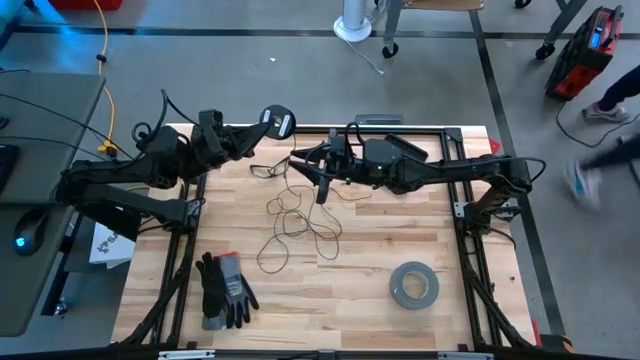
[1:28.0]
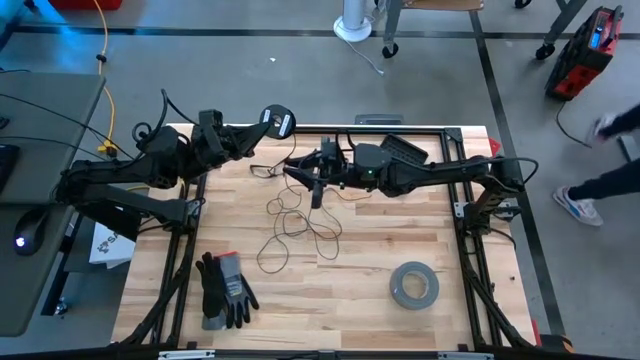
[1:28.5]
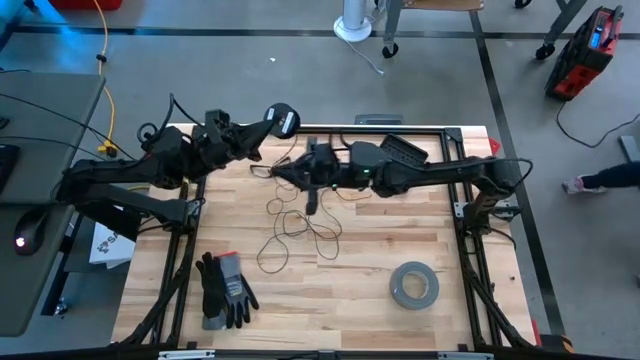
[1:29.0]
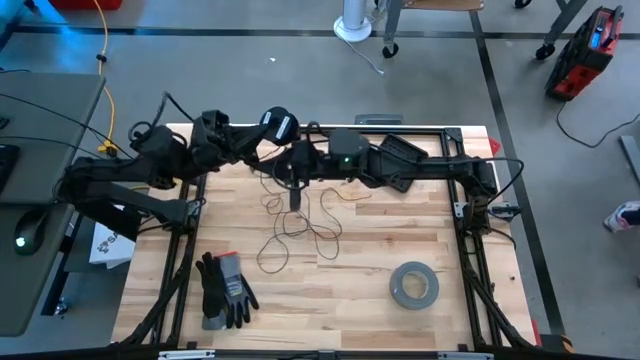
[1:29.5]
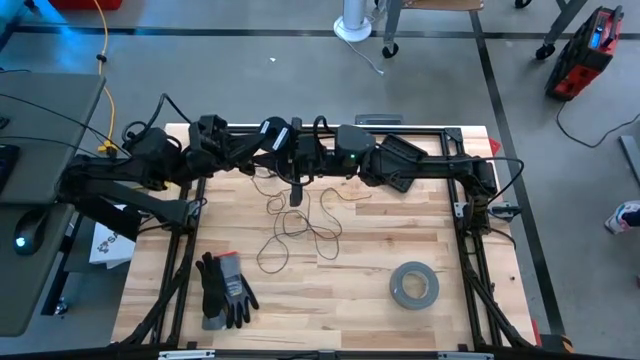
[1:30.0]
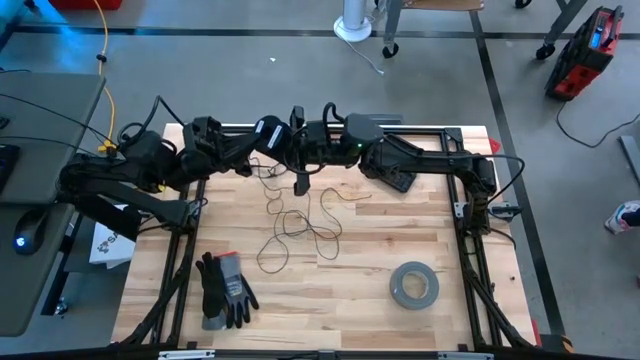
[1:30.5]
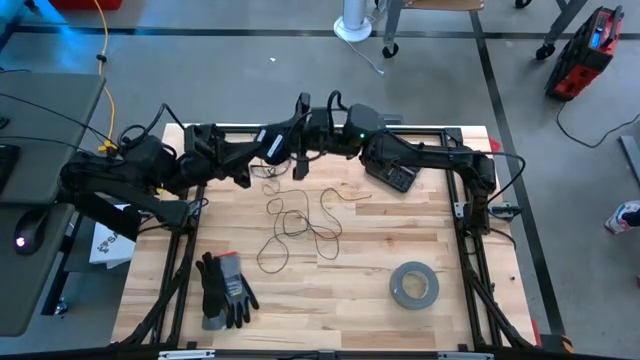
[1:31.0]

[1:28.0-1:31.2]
Task: Coil cords
Coil the black wire on the black spool

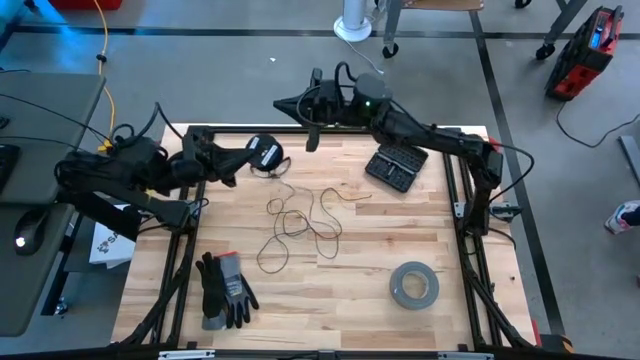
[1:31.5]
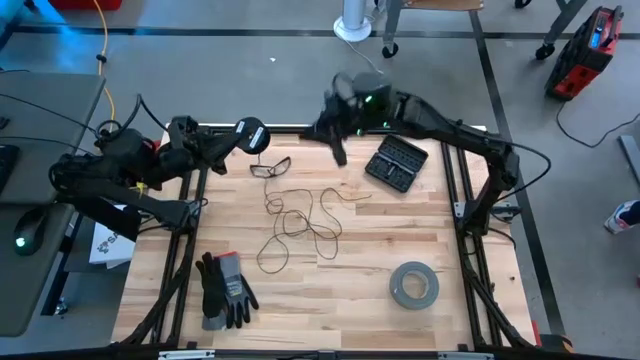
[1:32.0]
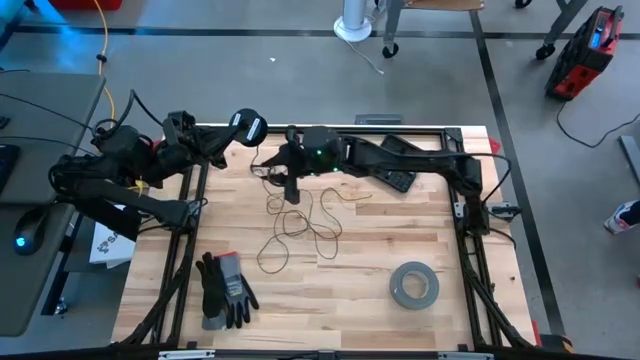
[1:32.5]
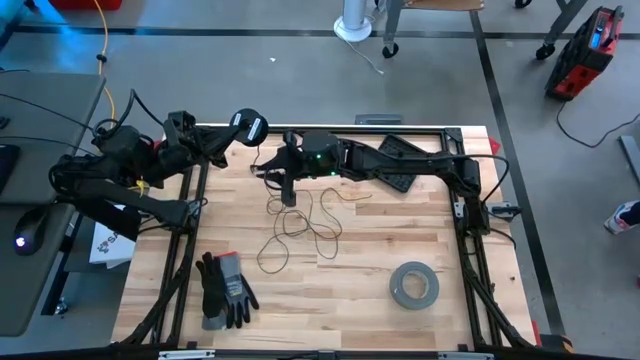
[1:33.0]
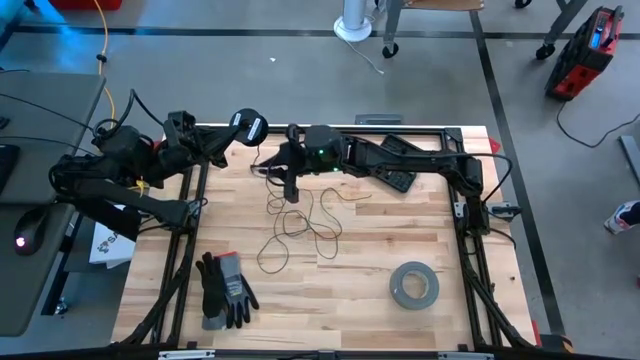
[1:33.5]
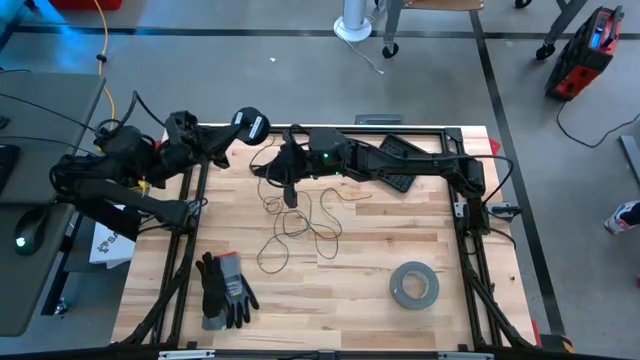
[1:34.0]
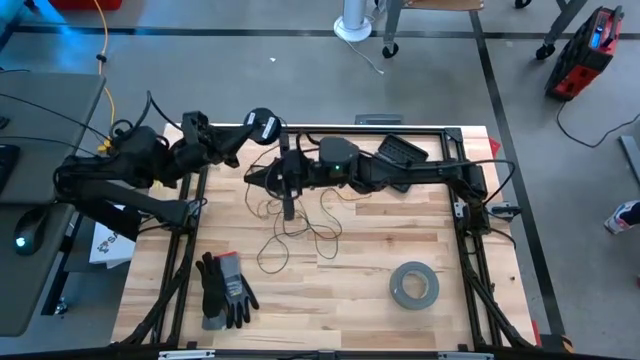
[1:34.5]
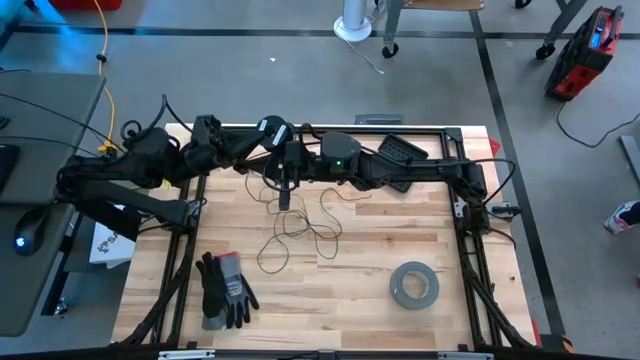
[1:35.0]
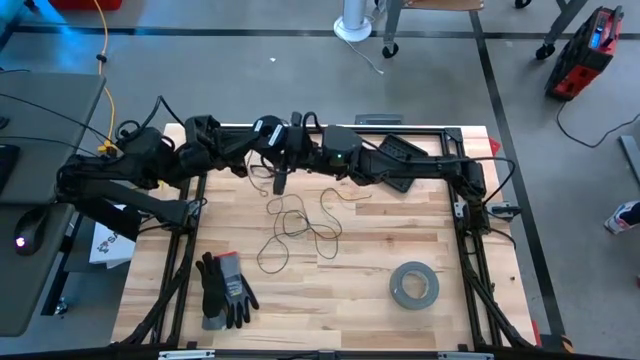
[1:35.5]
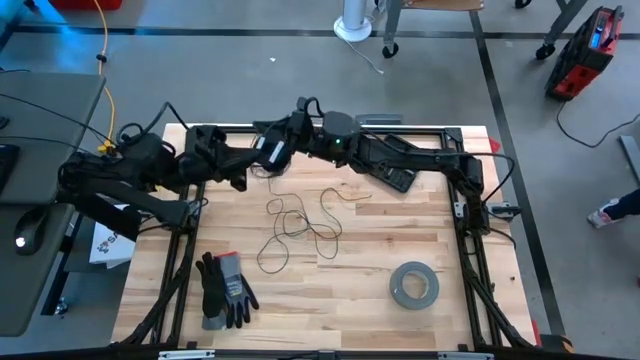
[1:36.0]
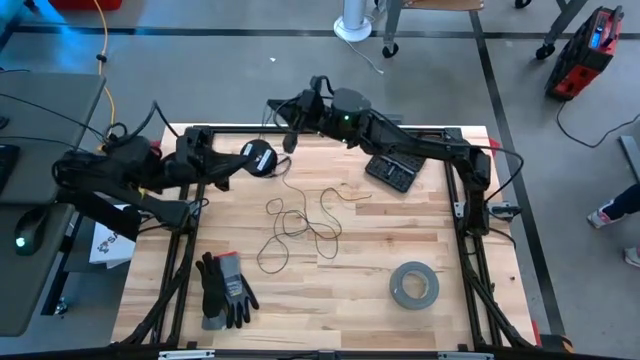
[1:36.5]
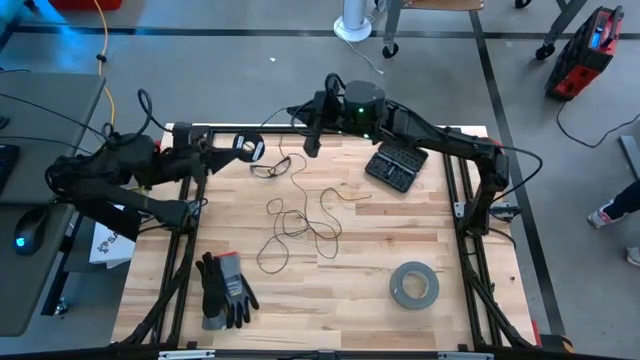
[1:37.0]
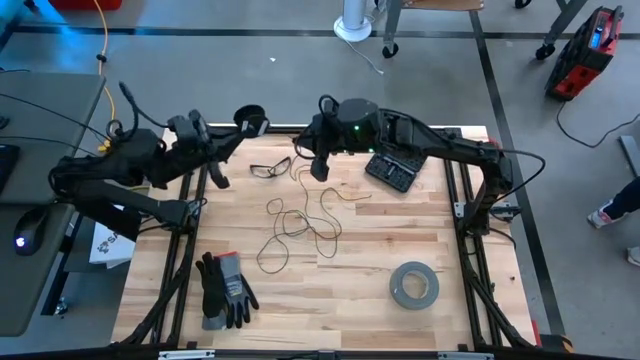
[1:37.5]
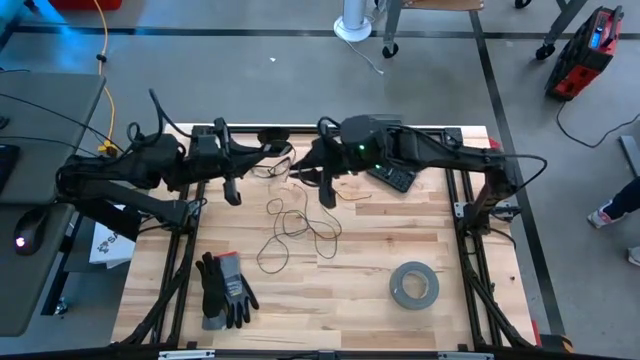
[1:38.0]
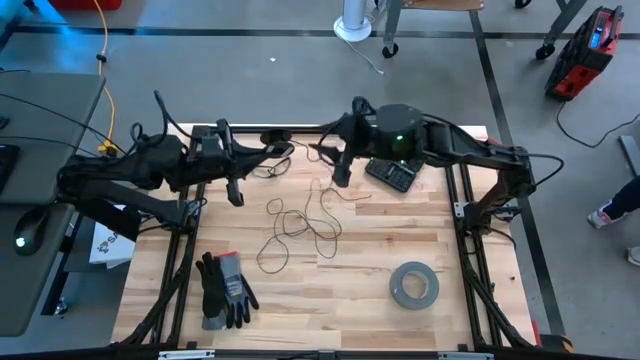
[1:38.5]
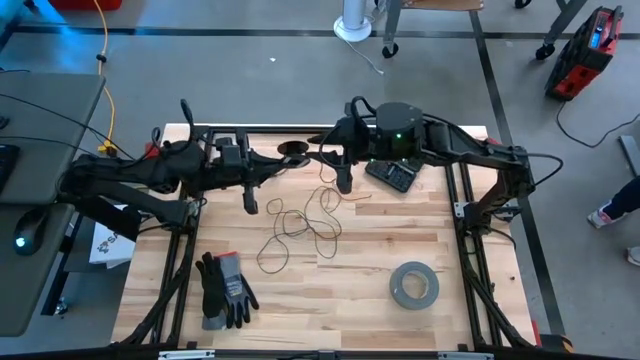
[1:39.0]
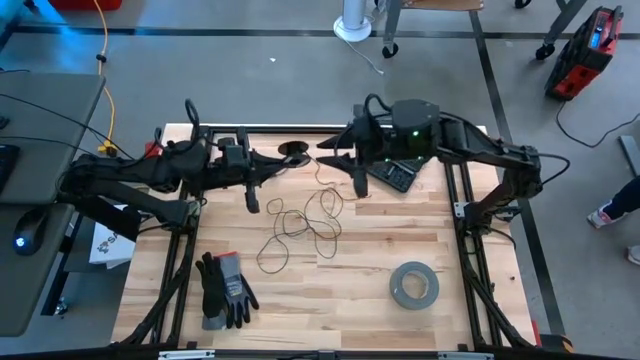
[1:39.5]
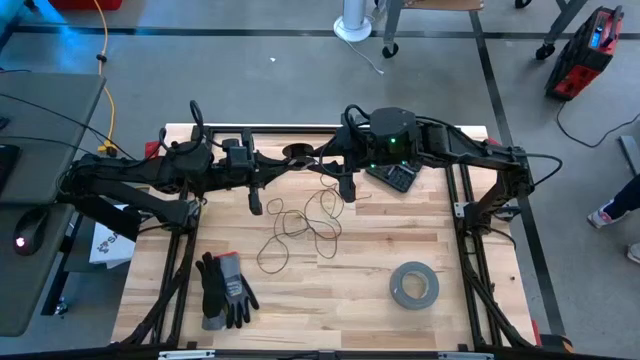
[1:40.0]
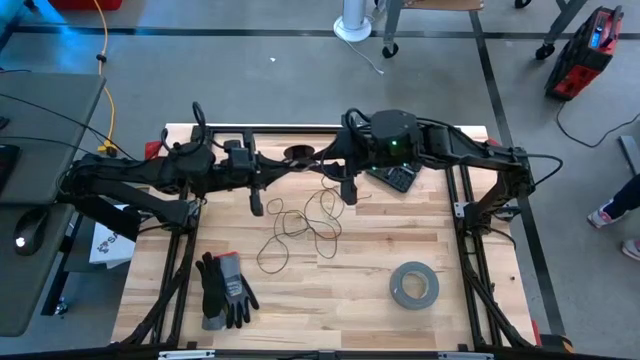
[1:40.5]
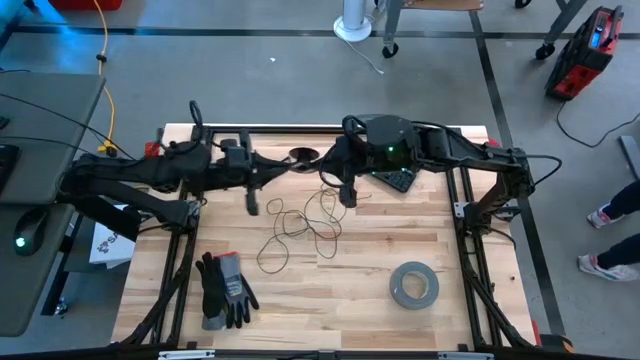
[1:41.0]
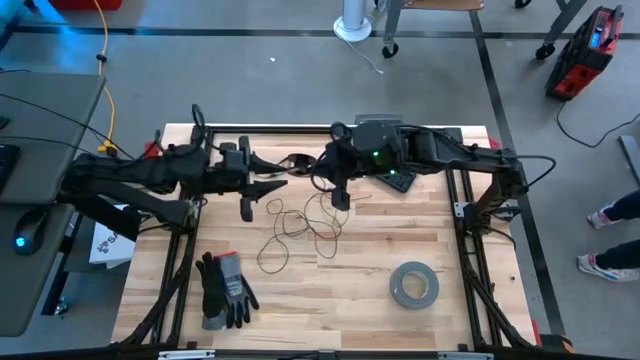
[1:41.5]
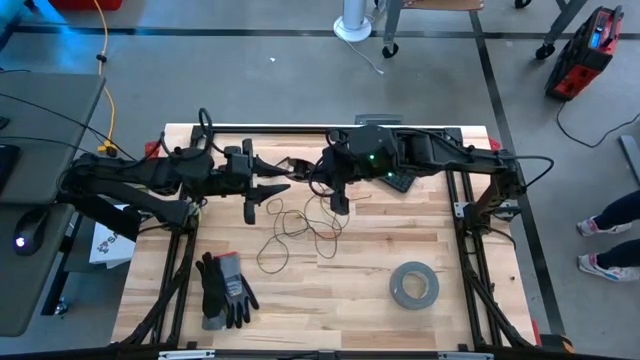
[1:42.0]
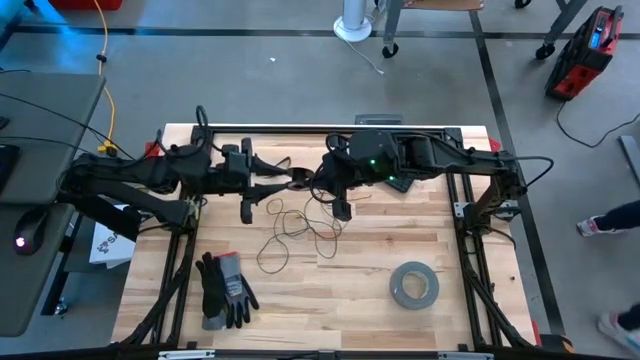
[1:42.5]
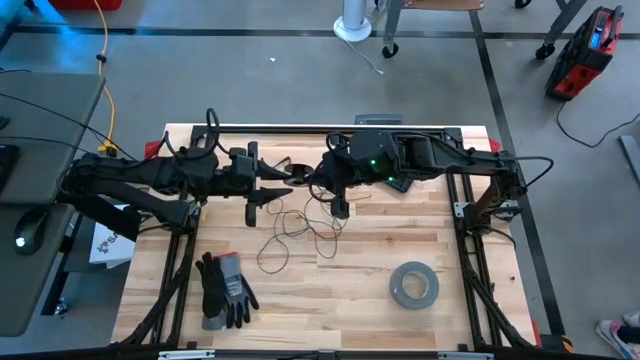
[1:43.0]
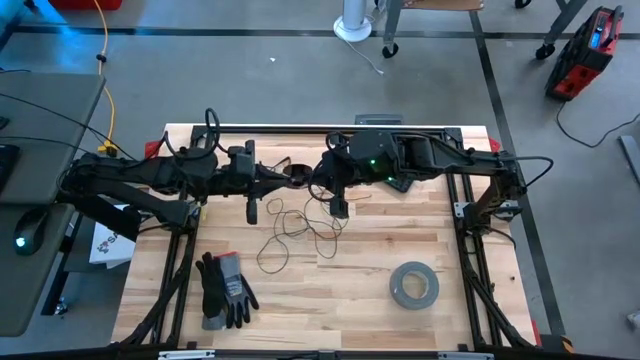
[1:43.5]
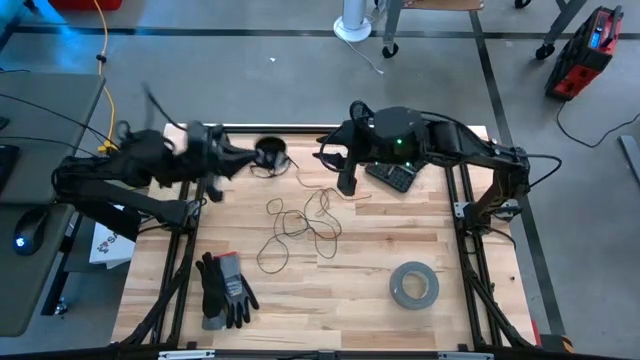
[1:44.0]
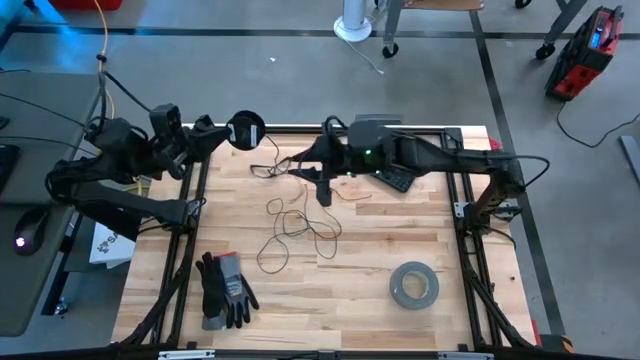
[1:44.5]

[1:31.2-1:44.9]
Coil the black wire on the black spool

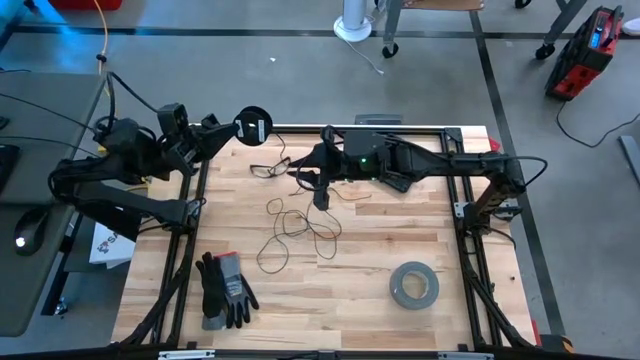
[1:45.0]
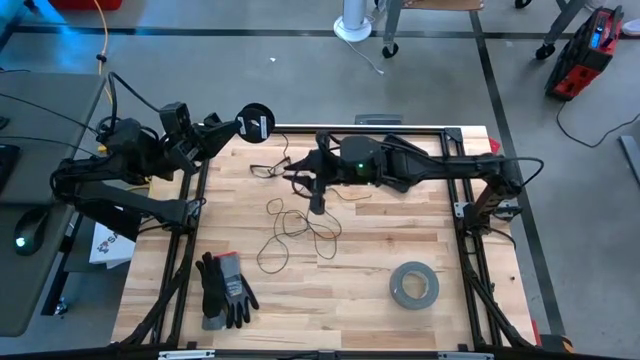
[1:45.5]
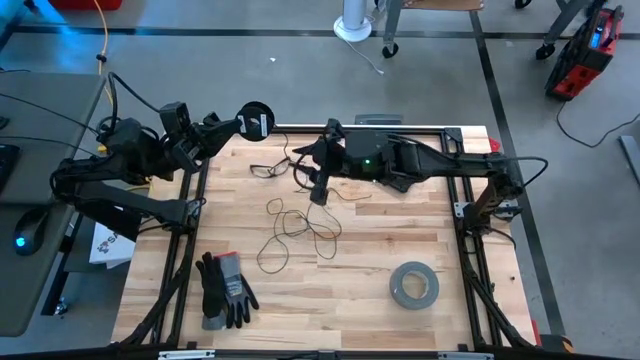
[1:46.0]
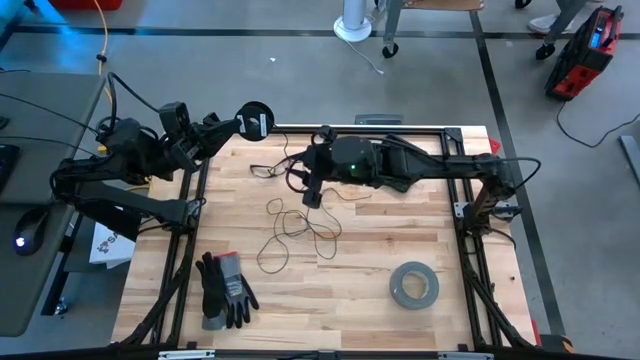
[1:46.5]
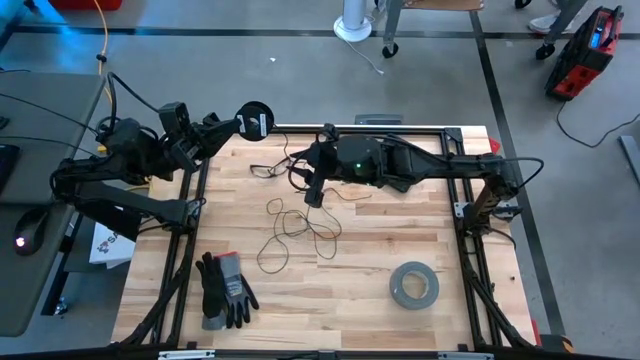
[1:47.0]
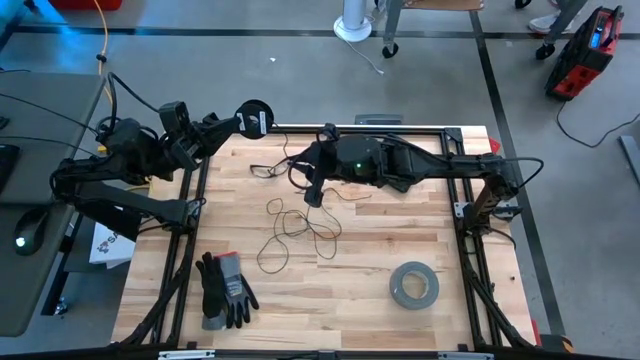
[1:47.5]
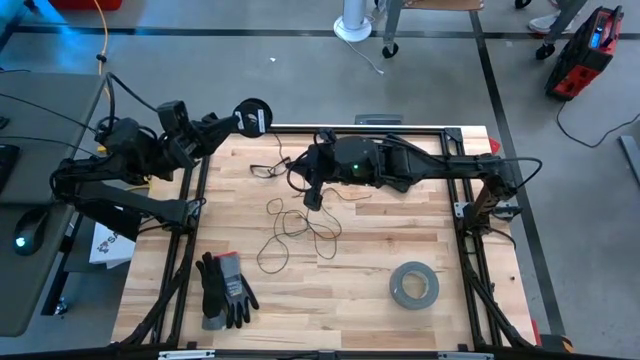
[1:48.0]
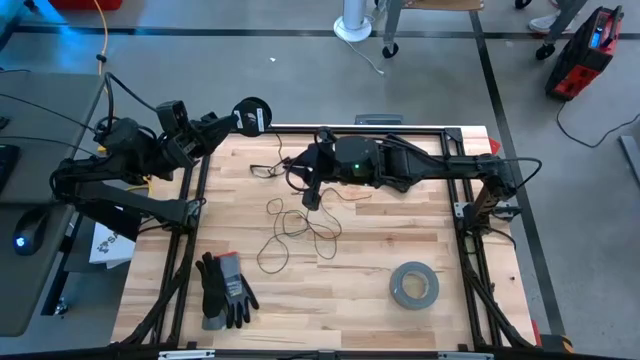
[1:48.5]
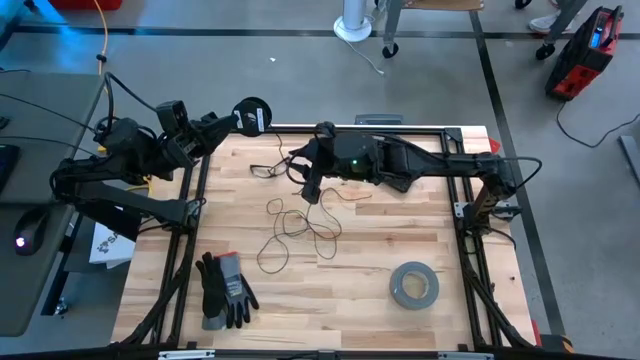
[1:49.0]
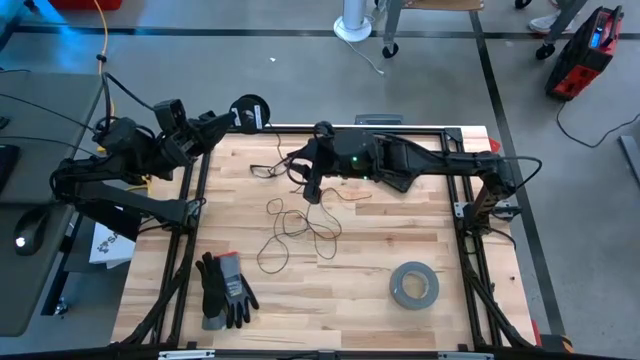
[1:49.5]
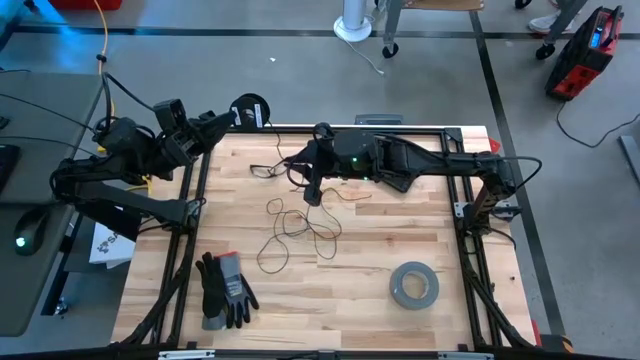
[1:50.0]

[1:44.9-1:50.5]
Coil the black wire on the black spool
